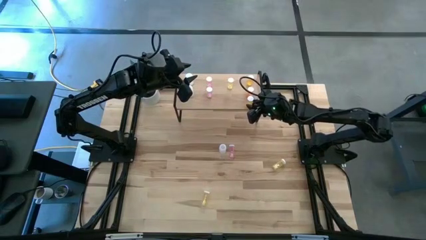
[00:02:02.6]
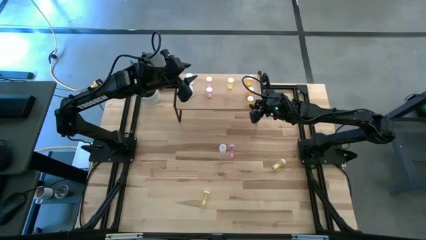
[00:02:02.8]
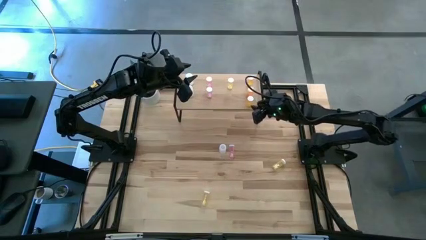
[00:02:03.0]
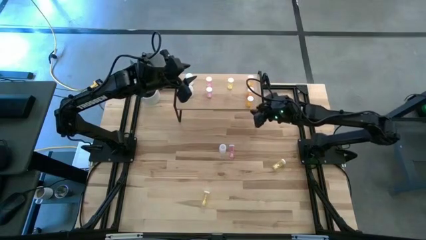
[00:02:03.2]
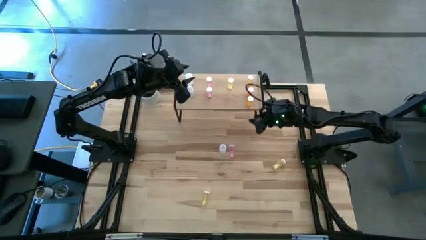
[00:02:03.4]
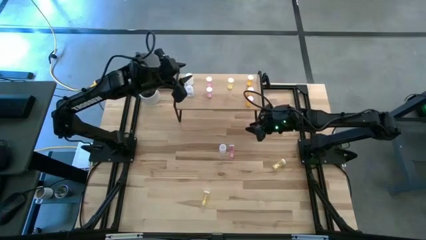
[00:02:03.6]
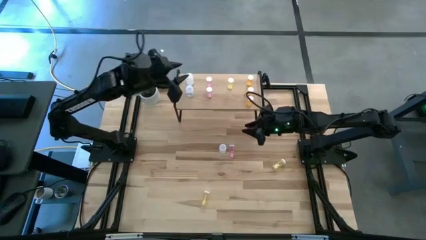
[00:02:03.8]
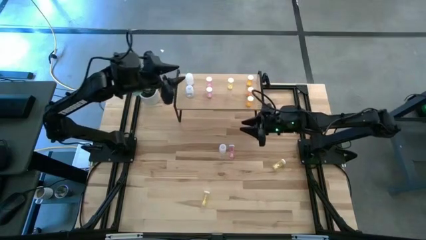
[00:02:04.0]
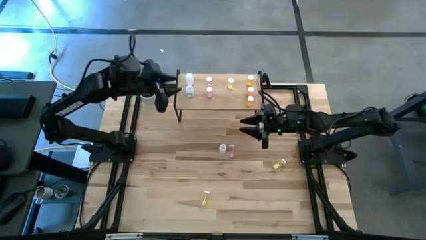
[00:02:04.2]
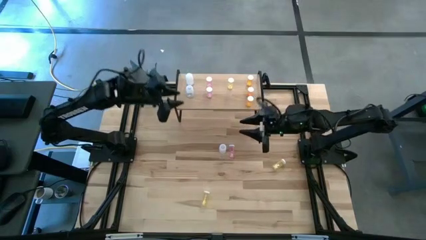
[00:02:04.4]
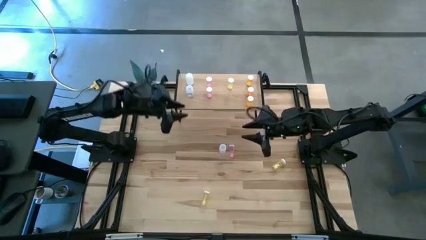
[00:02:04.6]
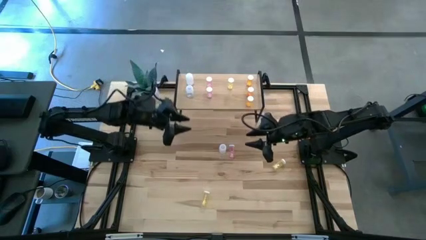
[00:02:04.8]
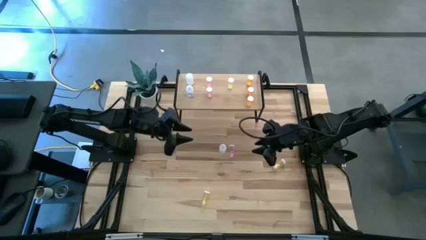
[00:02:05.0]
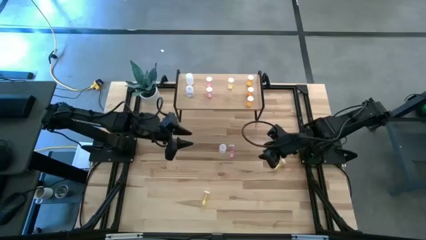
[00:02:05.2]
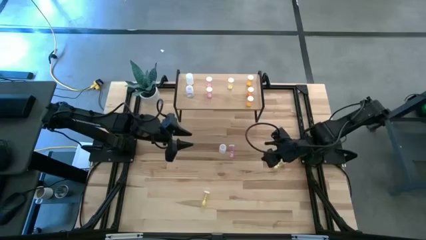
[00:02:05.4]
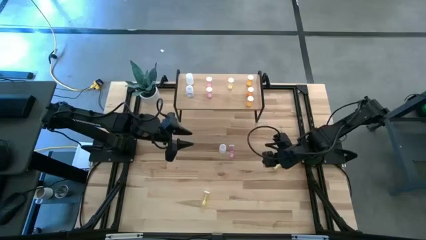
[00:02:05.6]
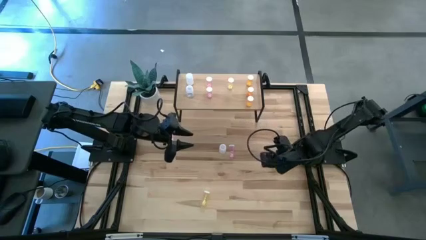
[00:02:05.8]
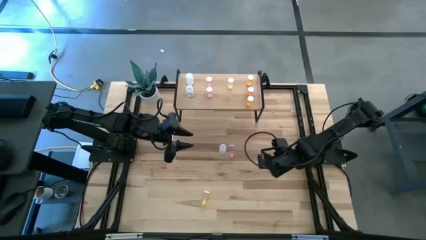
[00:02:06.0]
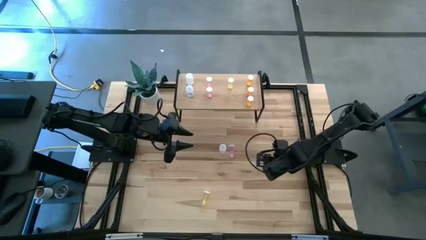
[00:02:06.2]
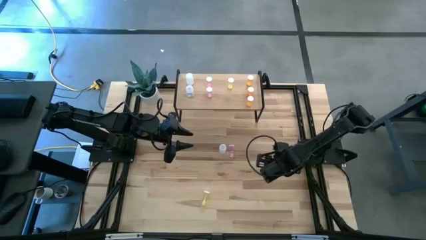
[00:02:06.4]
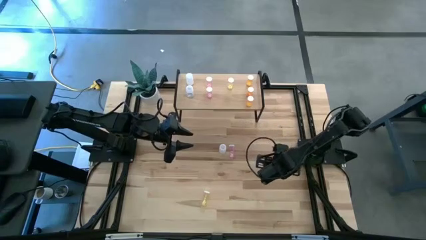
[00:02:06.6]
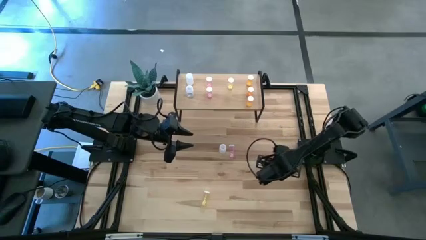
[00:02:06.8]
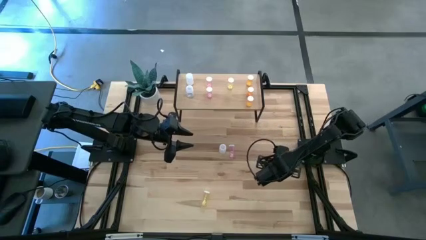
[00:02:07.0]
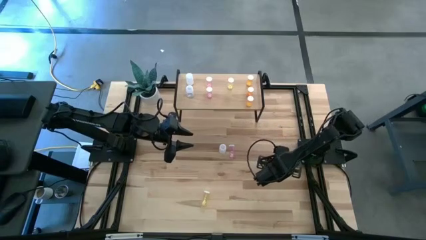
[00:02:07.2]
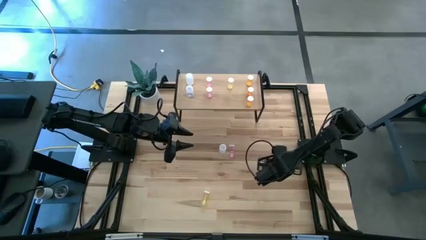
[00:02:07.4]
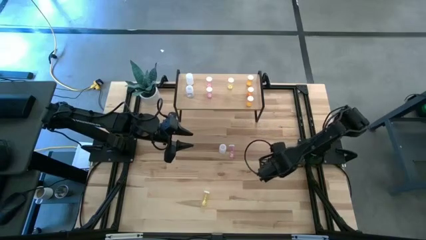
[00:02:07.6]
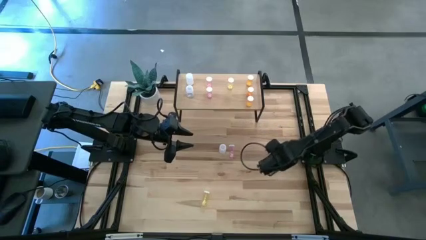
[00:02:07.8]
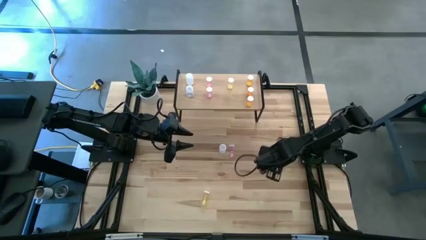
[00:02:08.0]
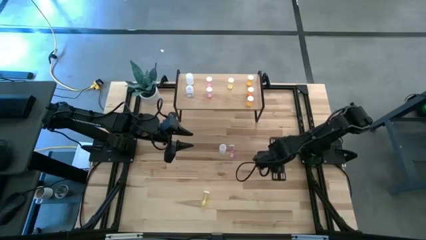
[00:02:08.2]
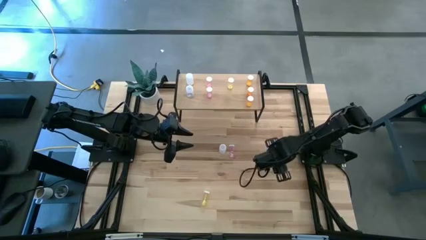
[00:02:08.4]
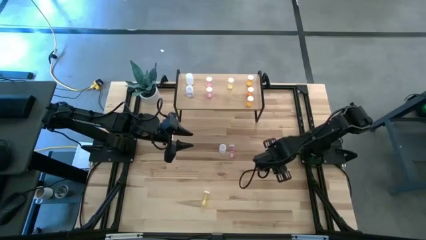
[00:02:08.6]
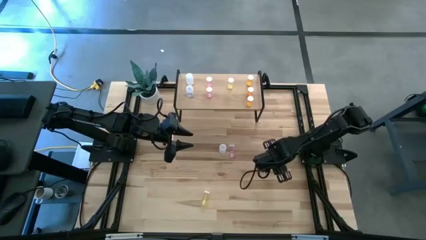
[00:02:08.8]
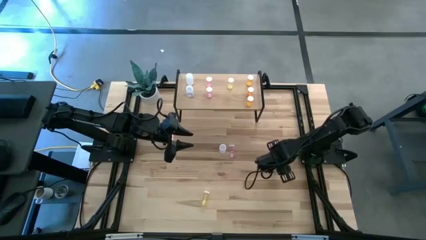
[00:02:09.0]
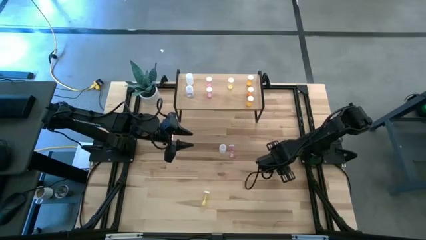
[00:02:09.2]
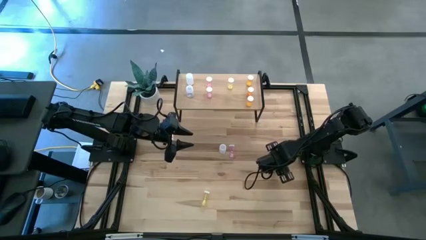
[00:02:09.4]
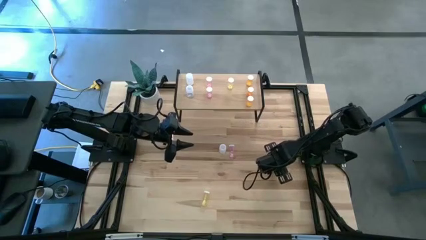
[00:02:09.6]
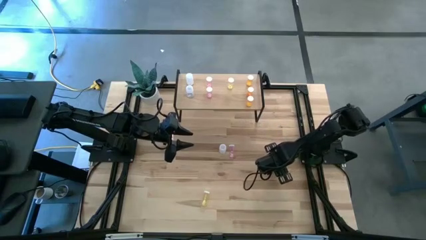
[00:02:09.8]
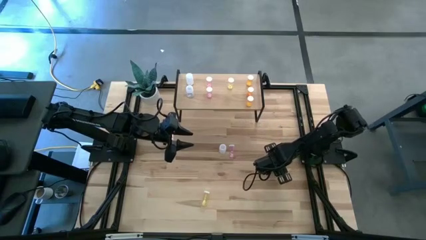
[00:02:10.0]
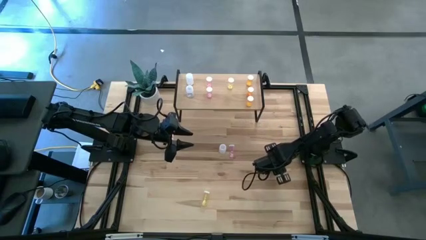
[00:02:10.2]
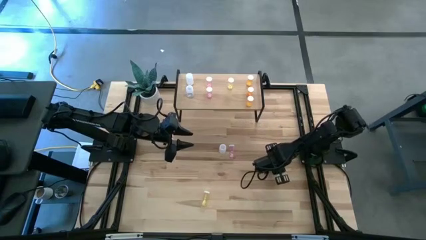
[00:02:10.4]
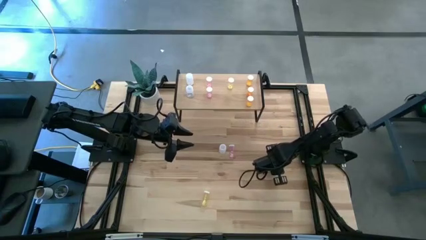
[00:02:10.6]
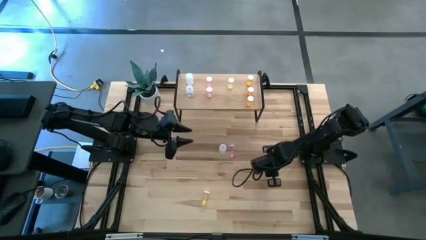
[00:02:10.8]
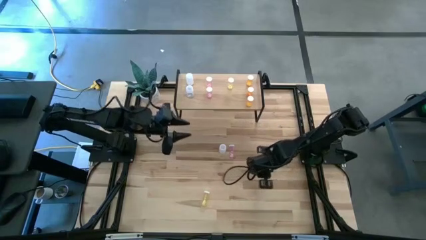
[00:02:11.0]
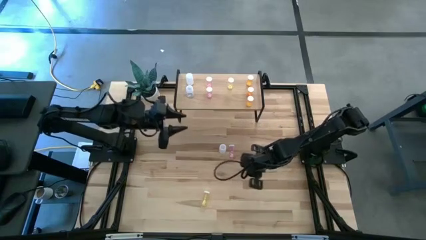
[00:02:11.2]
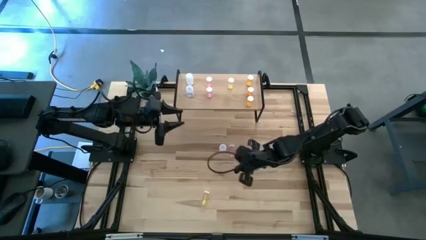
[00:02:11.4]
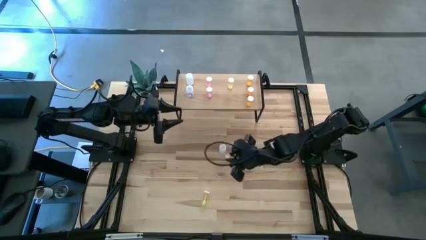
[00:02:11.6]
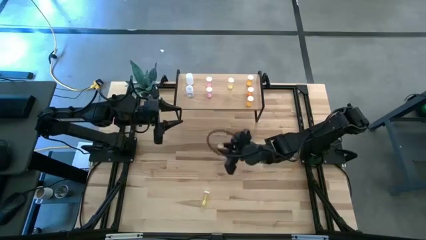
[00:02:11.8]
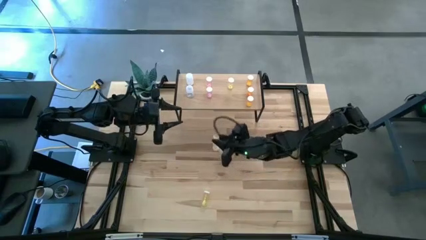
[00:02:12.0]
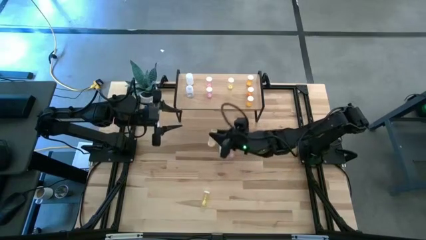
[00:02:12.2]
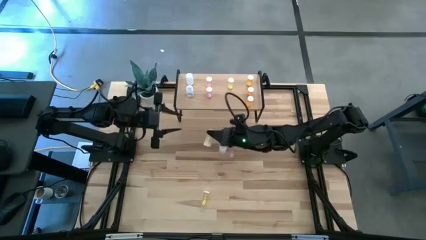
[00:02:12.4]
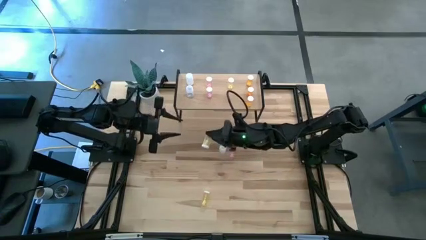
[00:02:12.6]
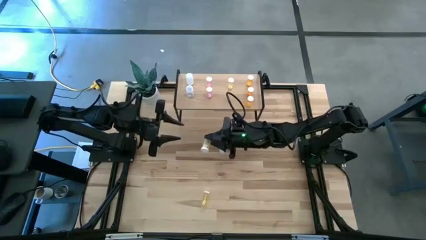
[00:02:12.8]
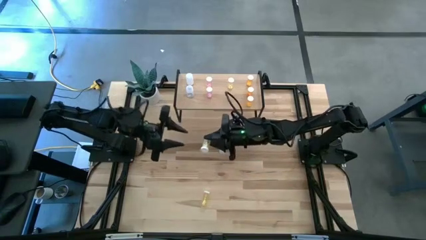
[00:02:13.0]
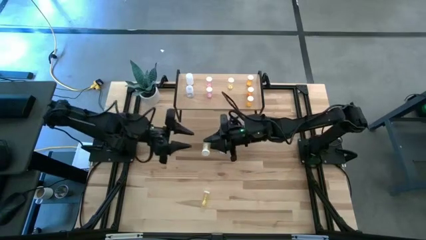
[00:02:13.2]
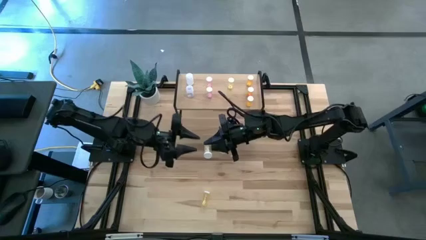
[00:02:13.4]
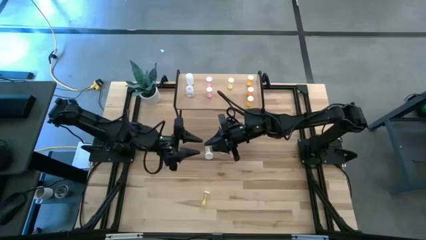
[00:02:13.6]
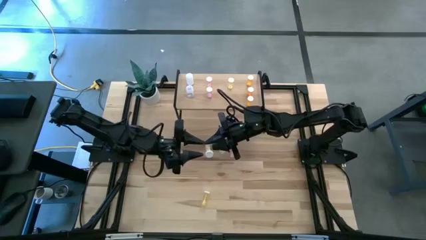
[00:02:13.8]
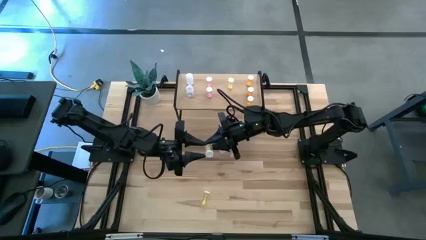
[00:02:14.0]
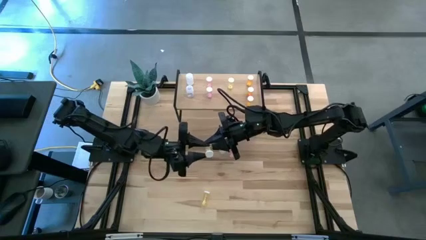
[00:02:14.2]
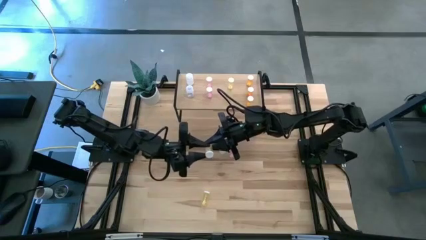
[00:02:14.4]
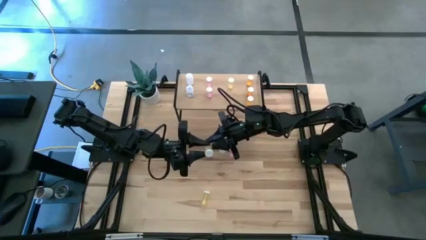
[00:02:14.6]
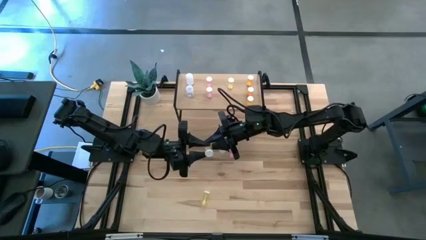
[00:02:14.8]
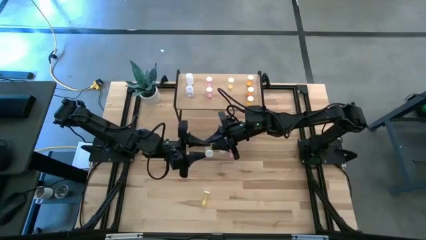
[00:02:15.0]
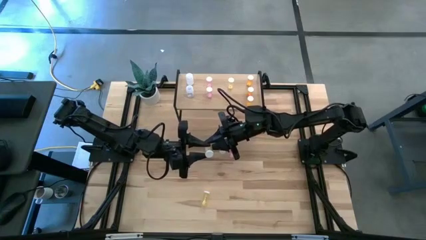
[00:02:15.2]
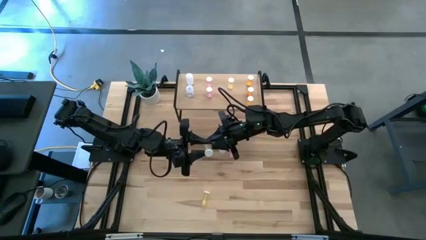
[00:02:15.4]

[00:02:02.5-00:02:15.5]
Task: Pick and place medicine bottles onto shelf by color
Put the right yellow pill bottle aligned with the other yellow pill bottle on the shelf
